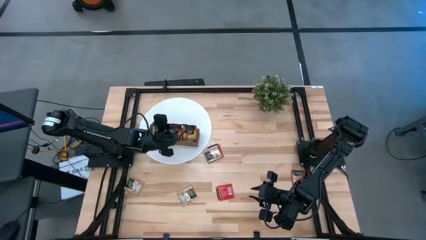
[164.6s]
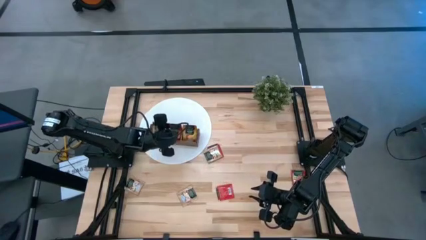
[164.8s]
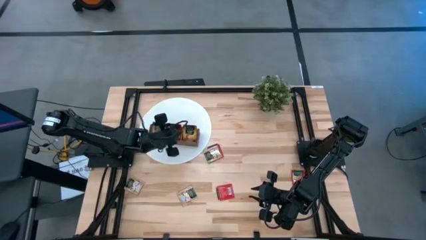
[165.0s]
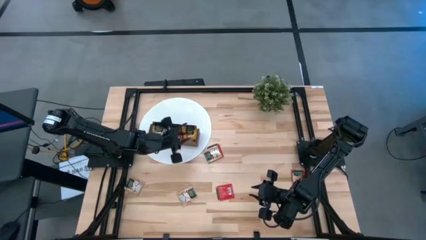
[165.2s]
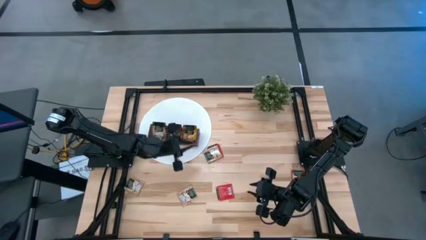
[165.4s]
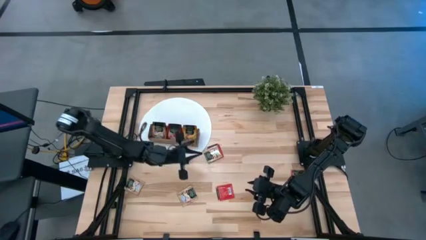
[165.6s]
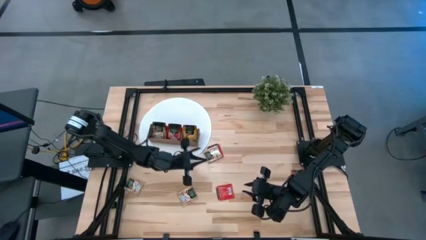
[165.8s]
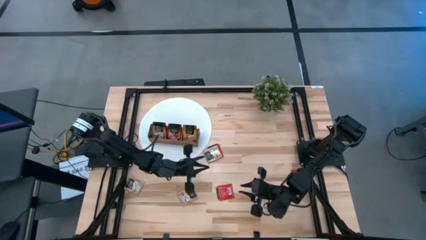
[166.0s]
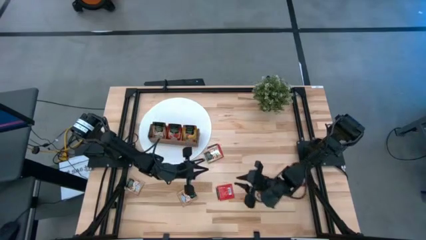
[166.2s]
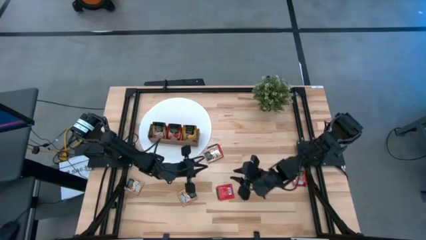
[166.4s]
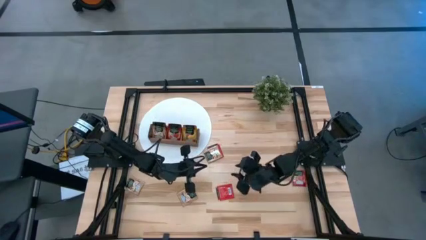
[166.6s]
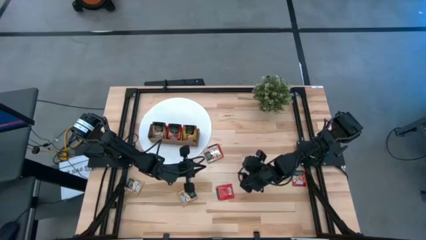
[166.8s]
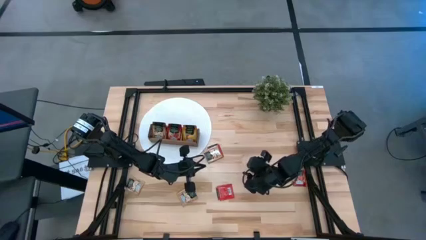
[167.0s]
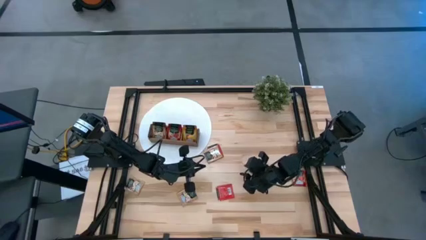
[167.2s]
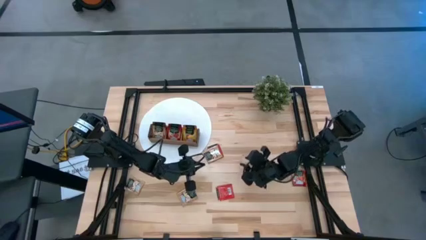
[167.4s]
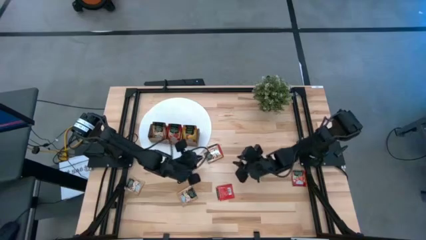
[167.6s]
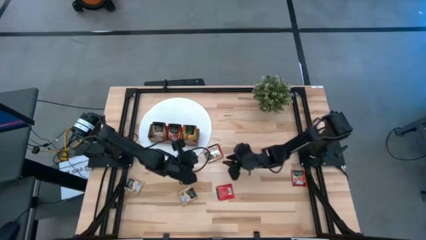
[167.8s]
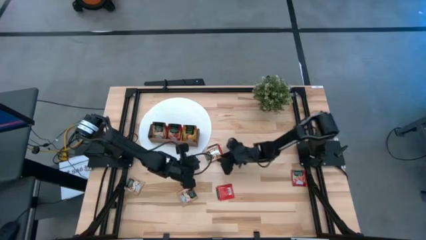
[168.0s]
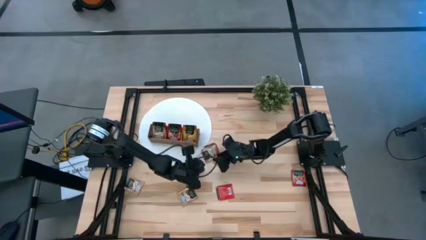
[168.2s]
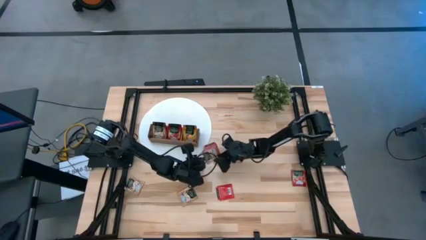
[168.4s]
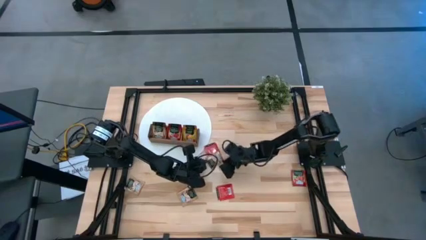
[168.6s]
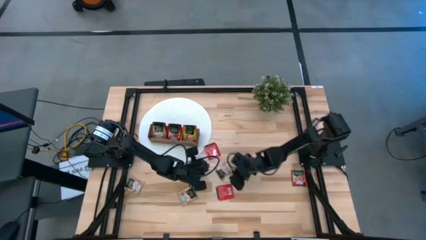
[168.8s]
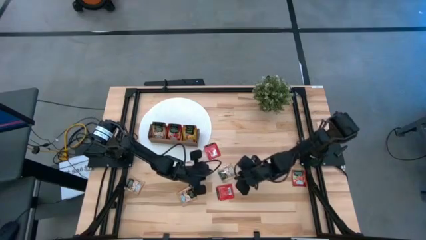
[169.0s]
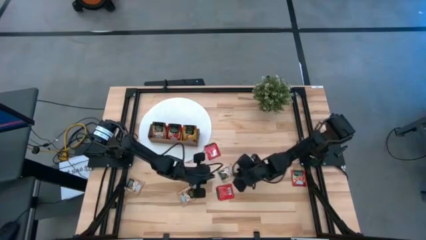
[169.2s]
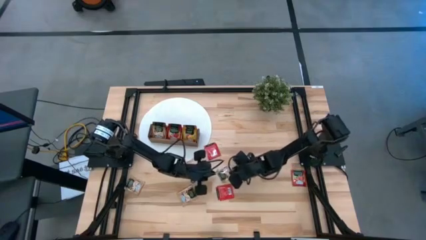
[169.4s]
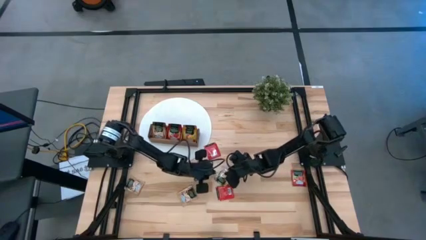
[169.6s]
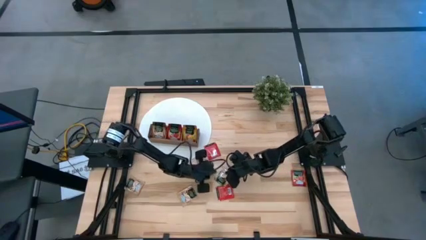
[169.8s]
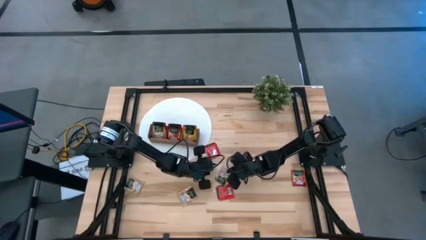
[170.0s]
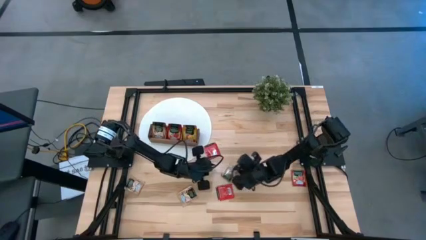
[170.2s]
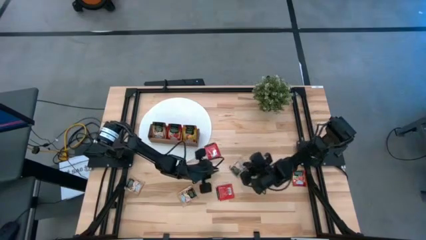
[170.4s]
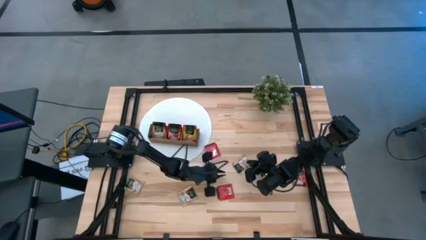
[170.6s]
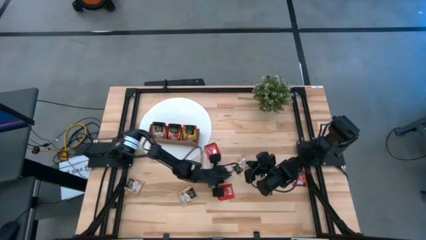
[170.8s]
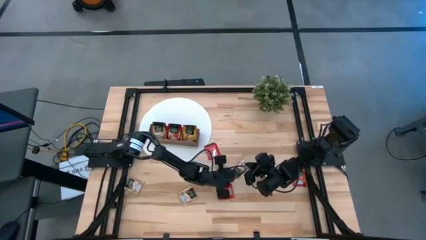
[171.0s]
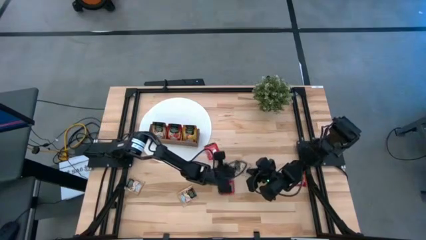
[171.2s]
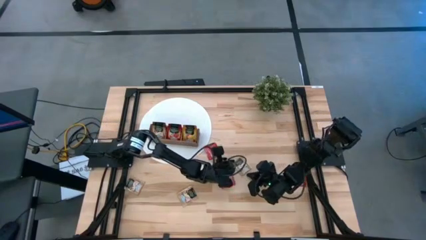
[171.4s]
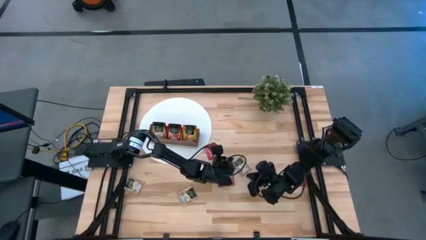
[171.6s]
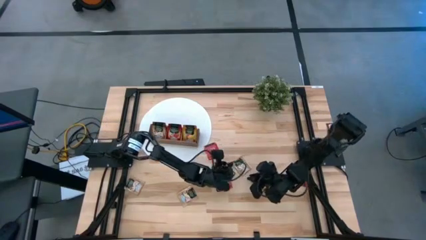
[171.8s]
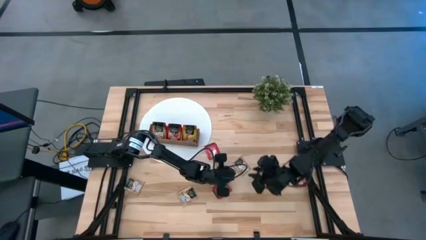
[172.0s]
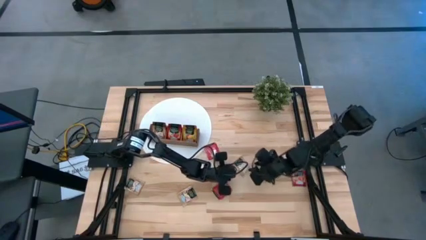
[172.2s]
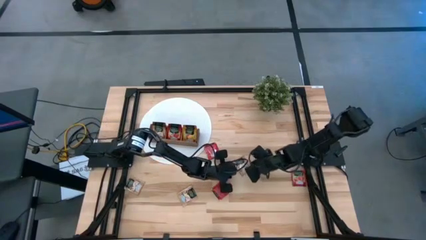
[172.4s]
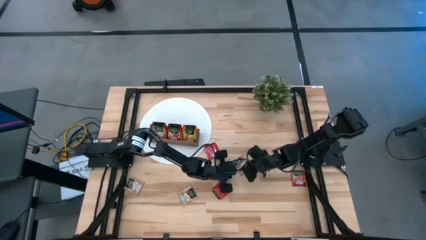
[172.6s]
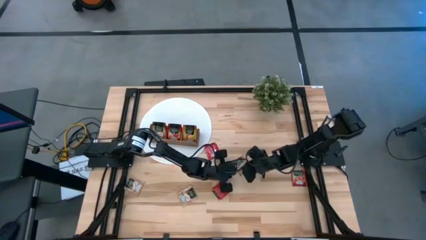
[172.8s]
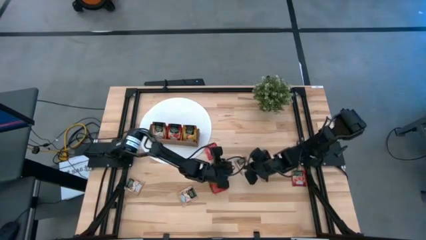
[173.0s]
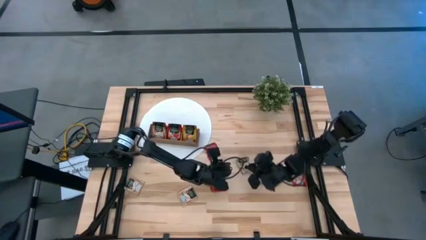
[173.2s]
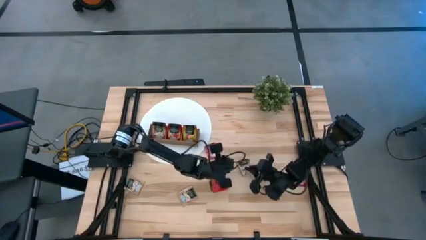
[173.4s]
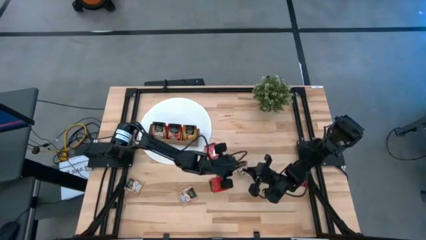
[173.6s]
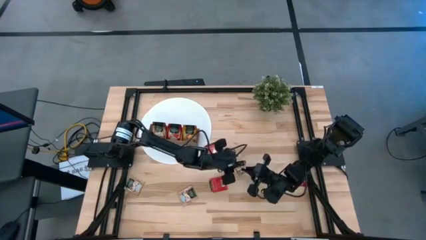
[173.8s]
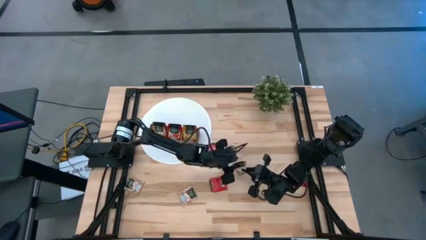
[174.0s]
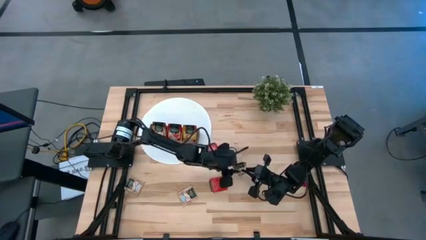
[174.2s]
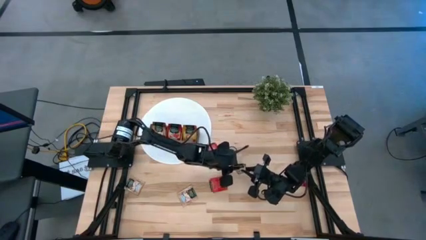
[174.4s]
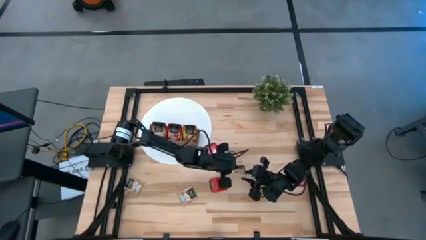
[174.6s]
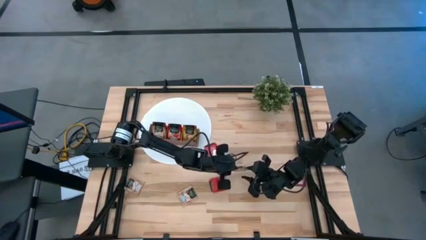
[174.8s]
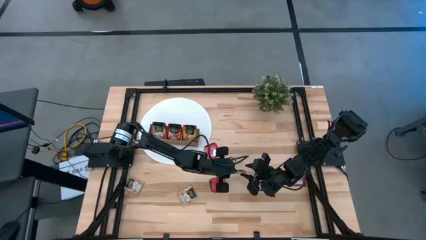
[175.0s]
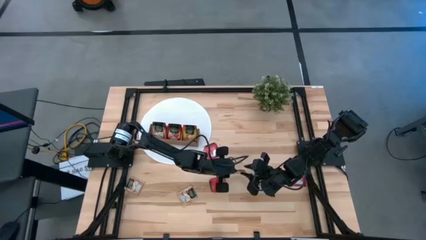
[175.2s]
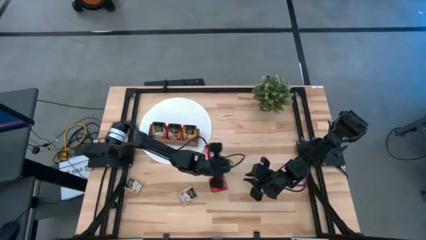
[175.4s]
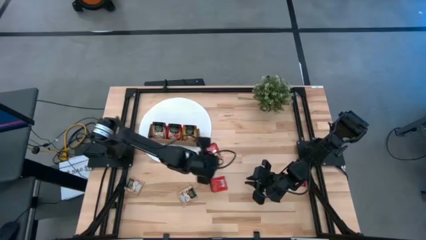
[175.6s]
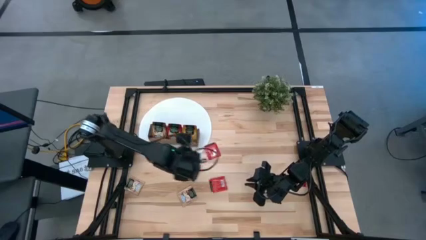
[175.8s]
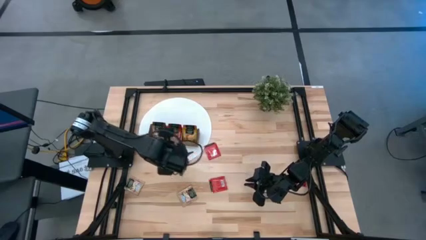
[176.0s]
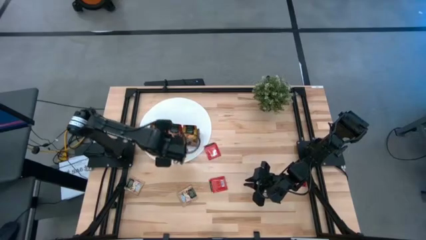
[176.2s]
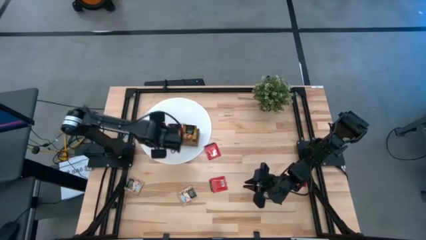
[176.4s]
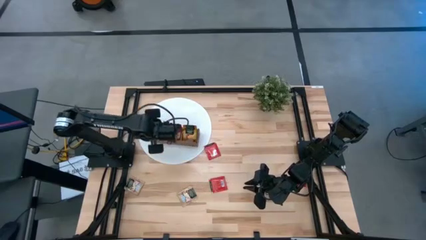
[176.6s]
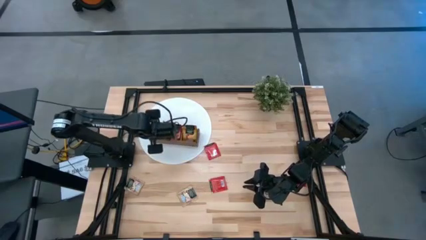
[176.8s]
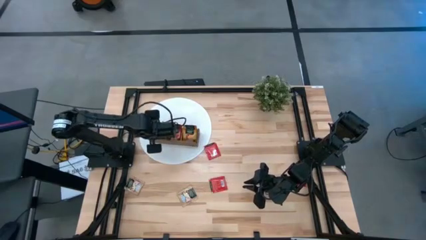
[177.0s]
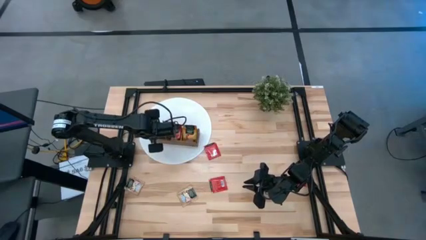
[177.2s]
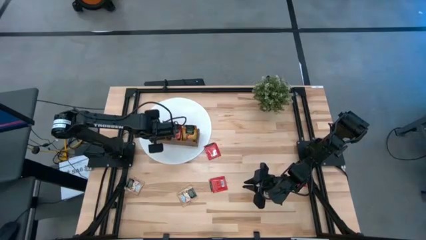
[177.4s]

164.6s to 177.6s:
Task: Pick & Place Tea
Put the brown tea bag into the left section of the wooden organizer

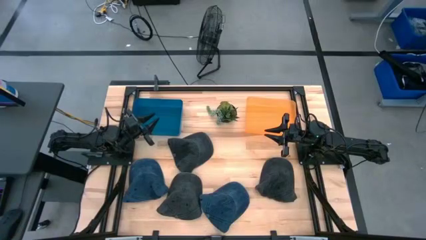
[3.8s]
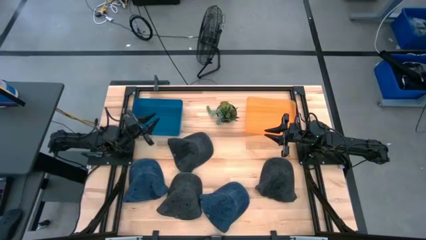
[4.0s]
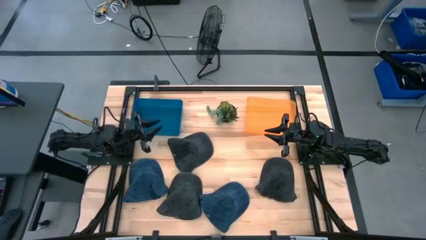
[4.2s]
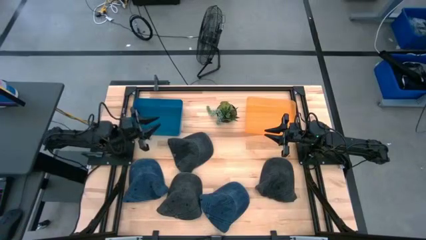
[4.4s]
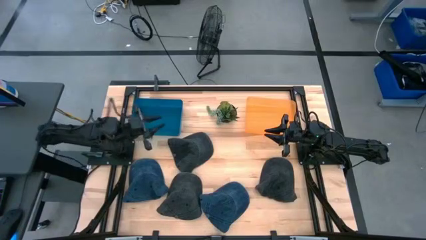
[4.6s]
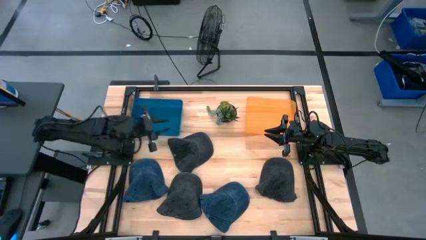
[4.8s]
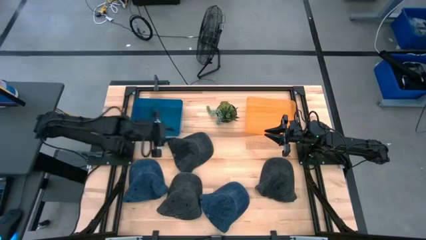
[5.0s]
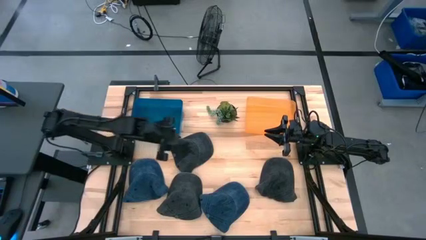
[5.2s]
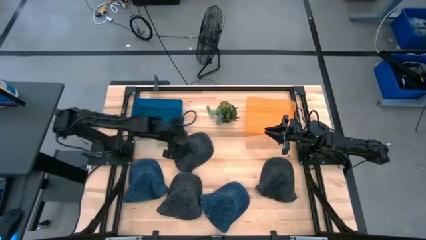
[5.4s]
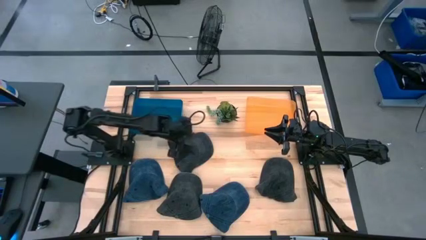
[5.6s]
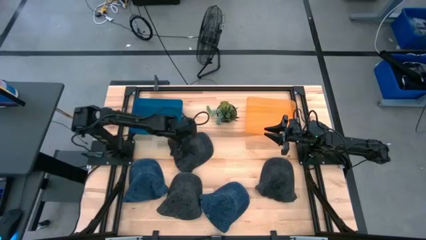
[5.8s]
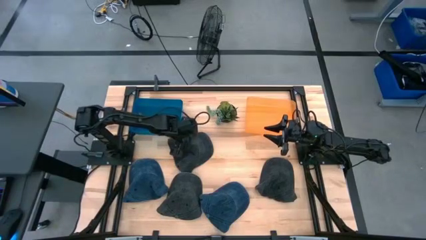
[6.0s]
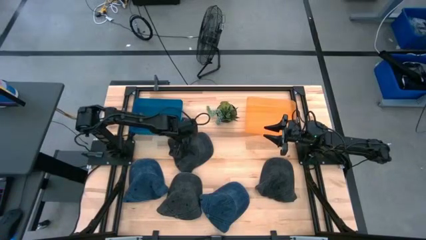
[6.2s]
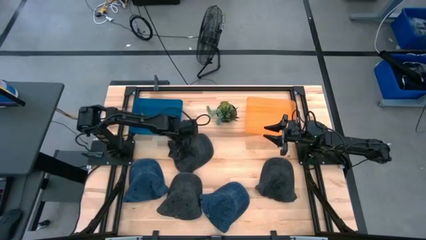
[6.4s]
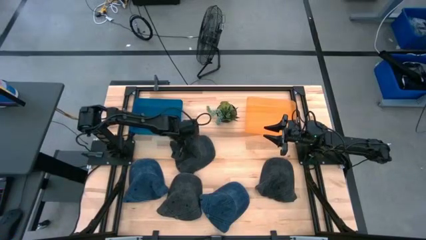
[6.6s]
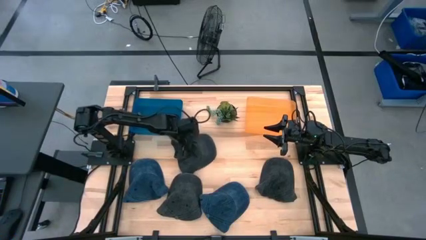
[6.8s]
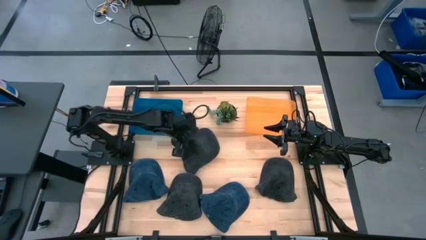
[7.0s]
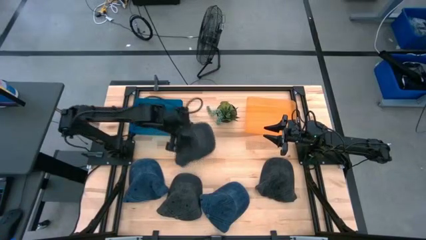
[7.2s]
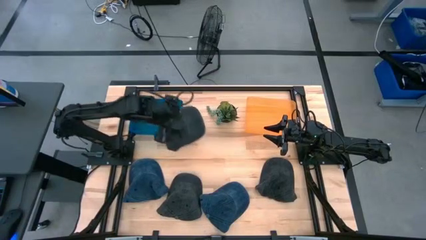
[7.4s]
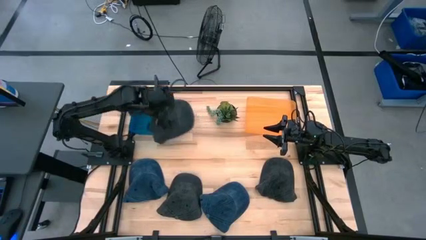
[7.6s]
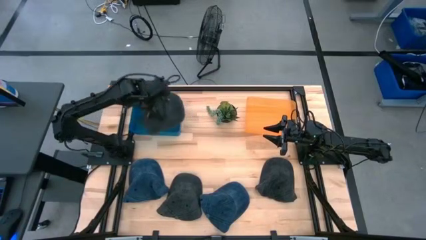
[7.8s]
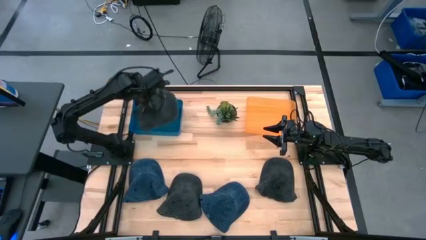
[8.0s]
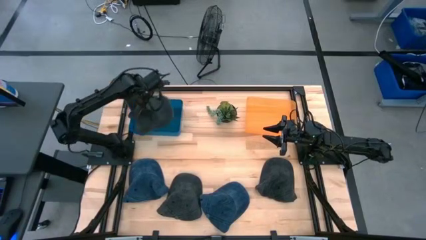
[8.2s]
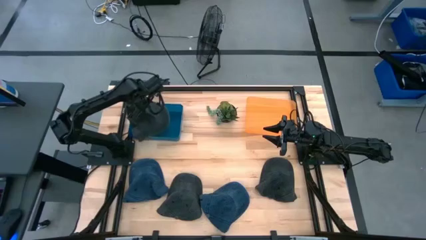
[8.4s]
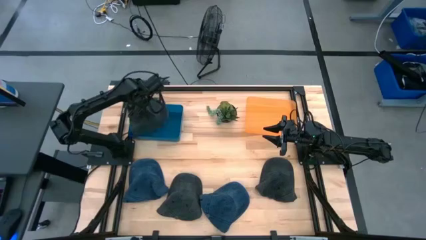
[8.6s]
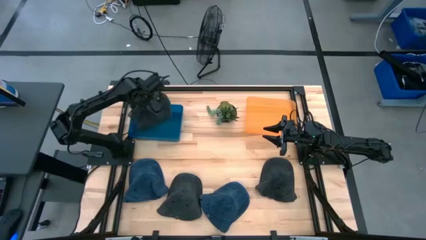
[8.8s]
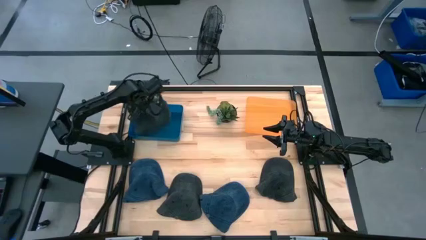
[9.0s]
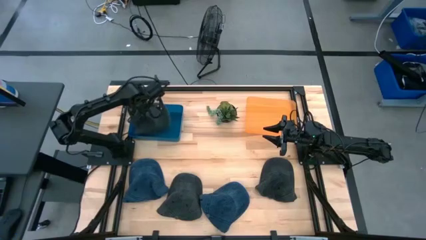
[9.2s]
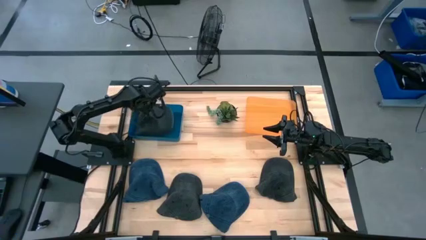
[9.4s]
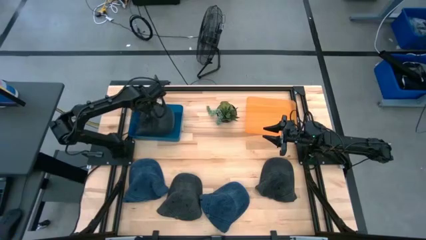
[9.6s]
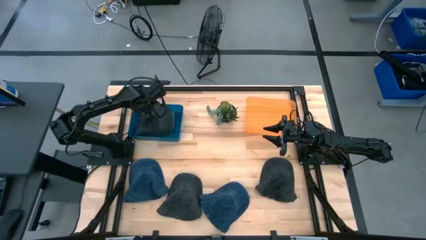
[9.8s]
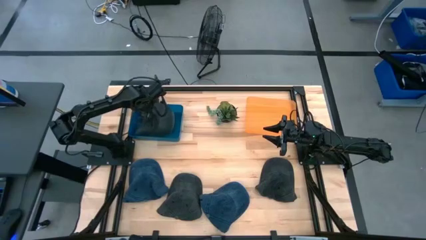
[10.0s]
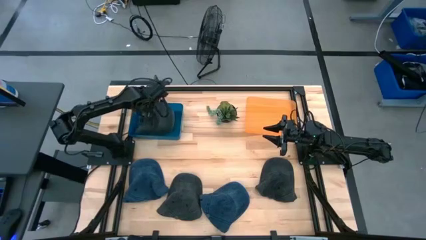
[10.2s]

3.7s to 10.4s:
Task: Pick & Place hat
Put the top black cap into the blue bin
